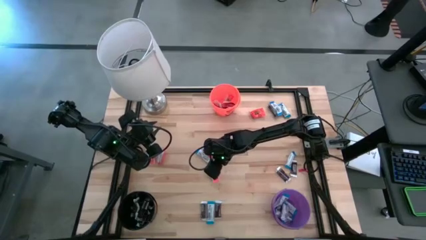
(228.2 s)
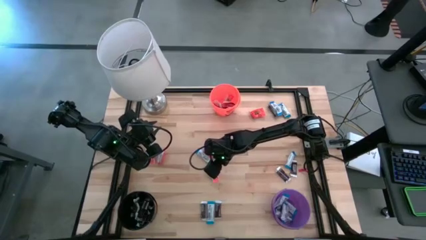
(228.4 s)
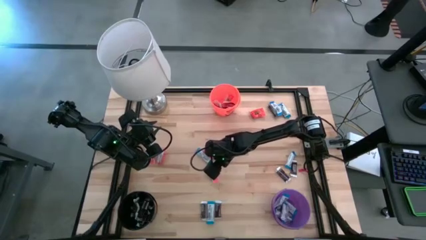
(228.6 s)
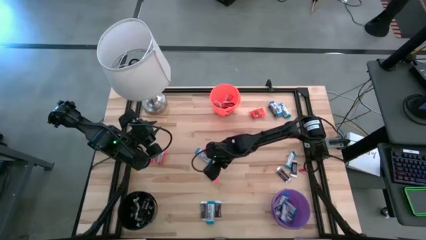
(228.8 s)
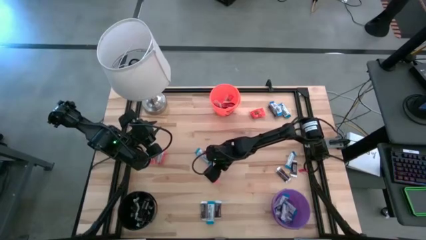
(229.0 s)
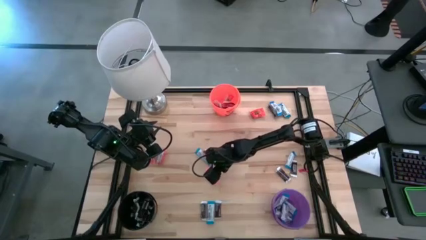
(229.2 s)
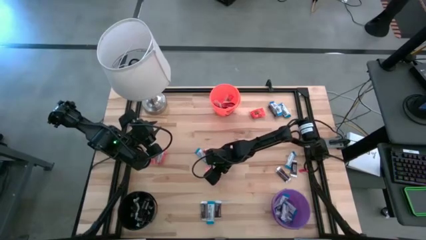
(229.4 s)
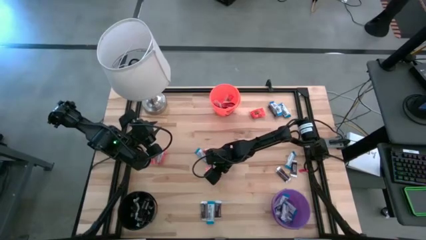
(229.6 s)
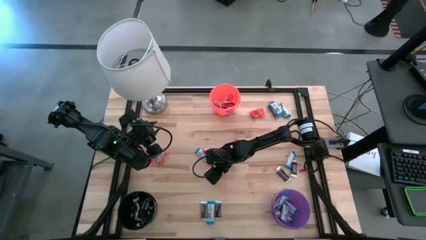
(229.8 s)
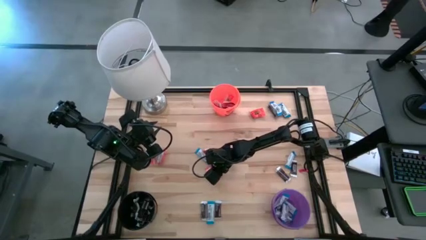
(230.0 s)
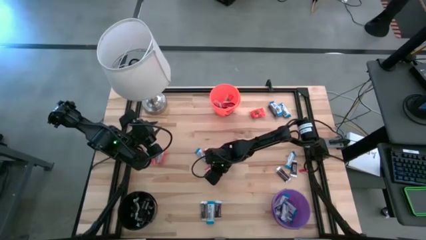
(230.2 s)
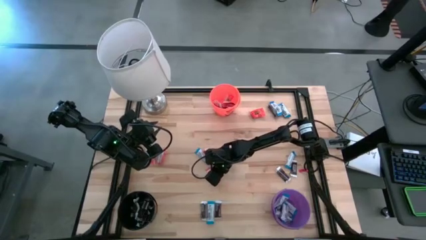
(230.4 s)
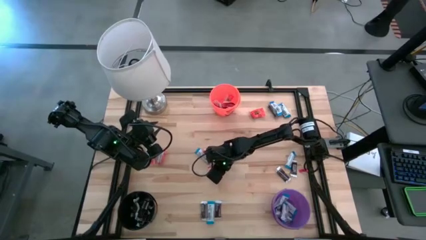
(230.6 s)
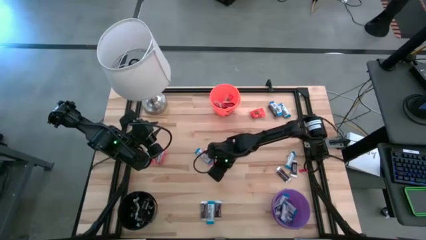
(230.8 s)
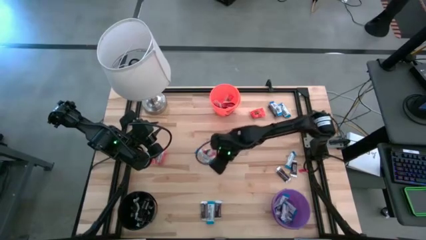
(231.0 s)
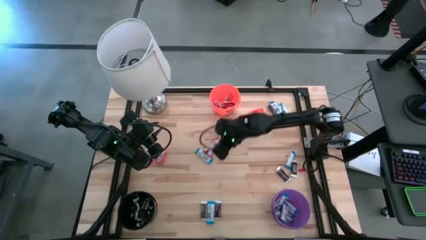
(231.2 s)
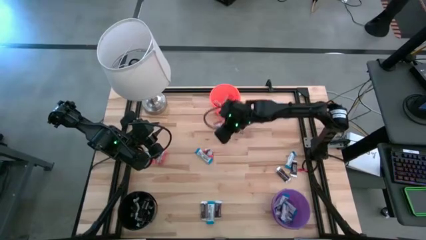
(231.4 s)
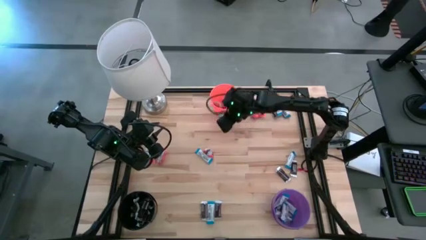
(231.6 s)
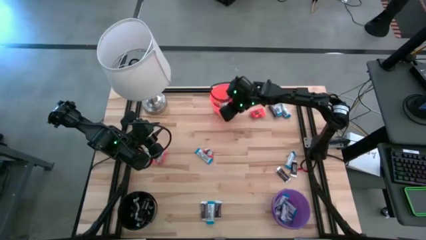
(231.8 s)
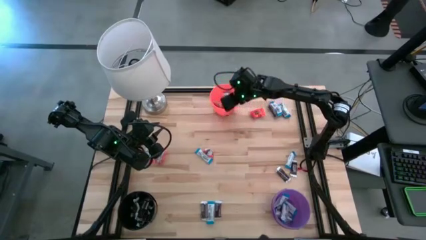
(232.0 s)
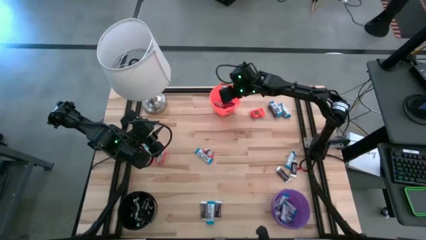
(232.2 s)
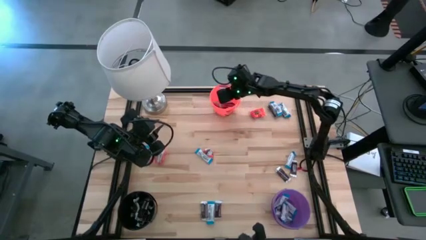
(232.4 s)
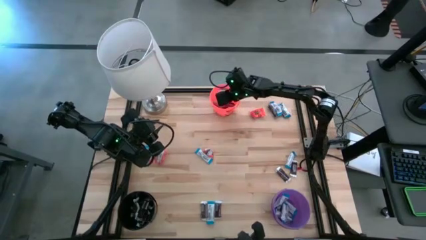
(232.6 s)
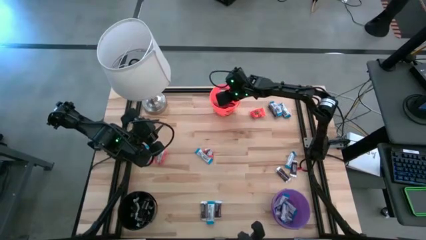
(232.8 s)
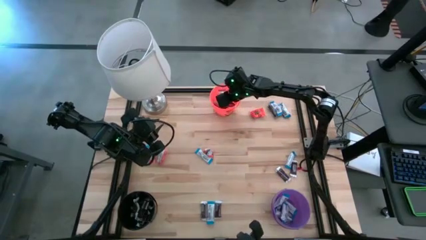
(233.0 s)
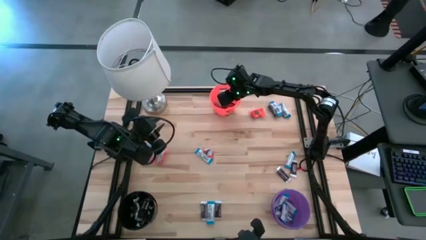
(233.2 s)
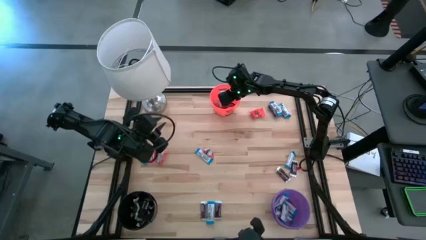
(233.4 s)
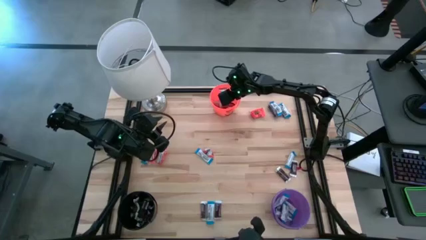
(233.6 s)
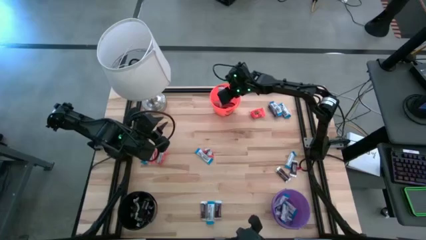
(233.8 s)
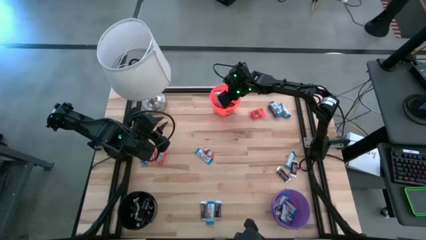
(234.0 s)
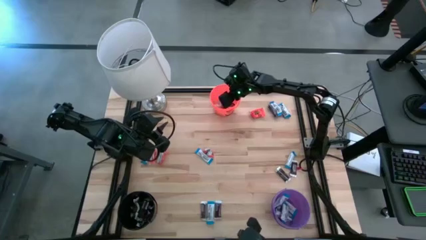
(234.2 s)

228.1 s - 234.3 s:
Task: Organize candy in baskets
Put the orange chocolate into the orange bucket

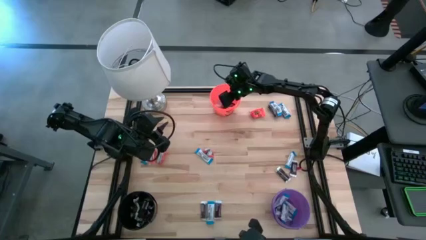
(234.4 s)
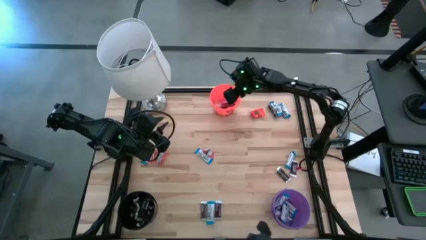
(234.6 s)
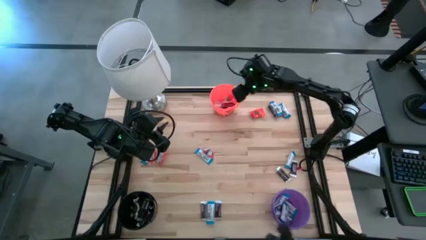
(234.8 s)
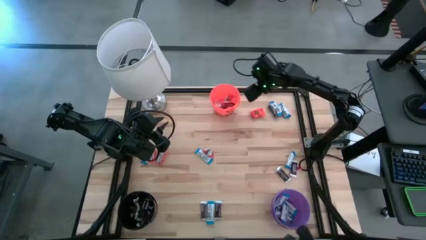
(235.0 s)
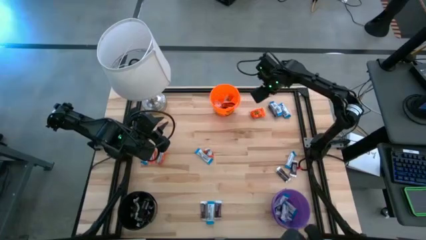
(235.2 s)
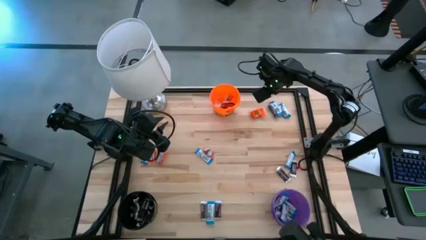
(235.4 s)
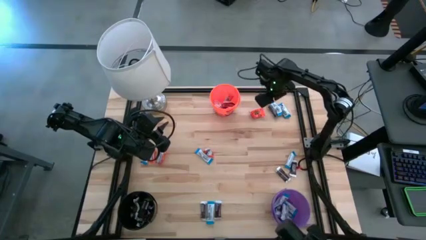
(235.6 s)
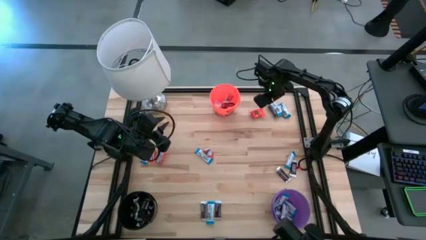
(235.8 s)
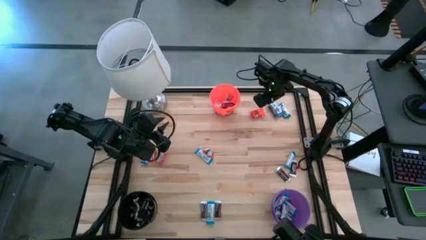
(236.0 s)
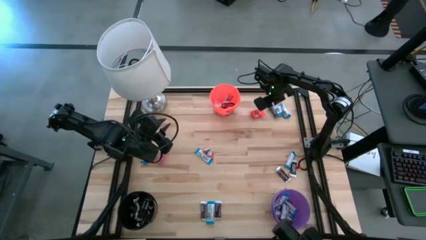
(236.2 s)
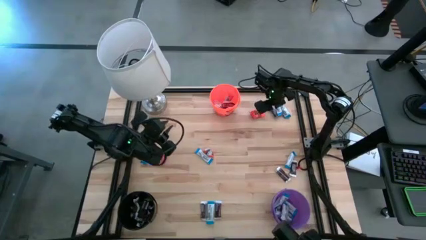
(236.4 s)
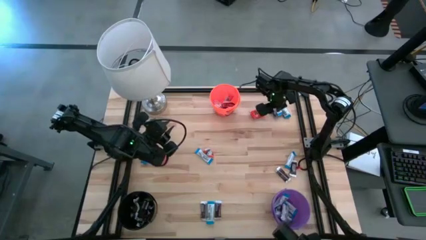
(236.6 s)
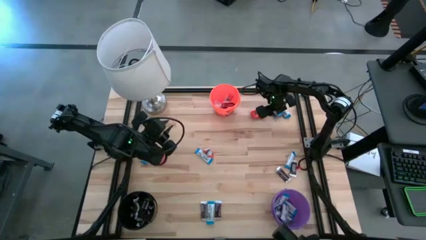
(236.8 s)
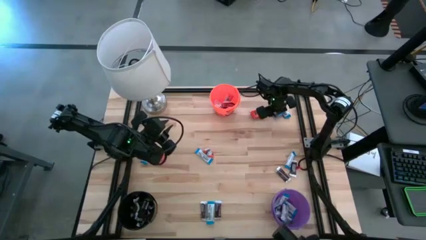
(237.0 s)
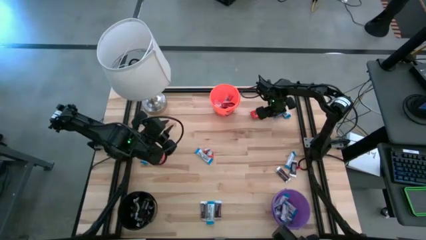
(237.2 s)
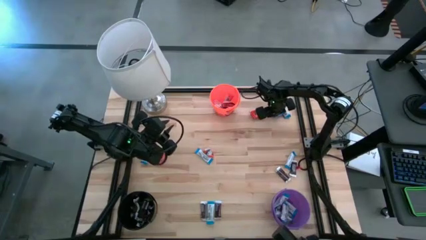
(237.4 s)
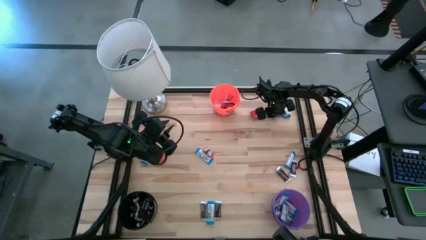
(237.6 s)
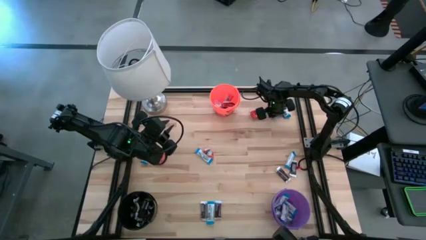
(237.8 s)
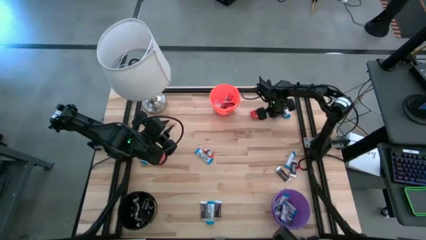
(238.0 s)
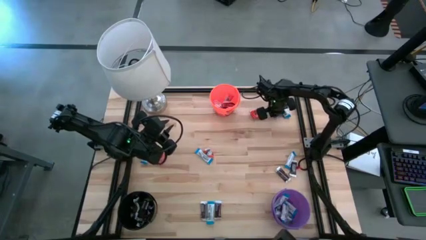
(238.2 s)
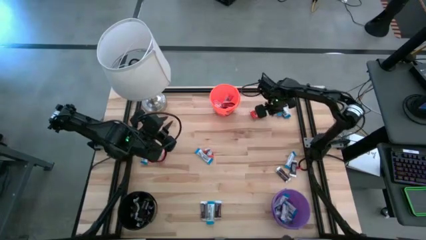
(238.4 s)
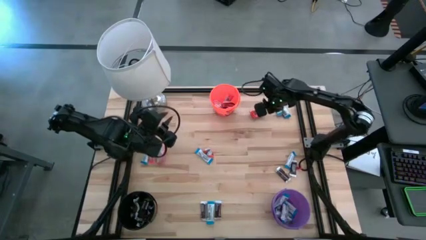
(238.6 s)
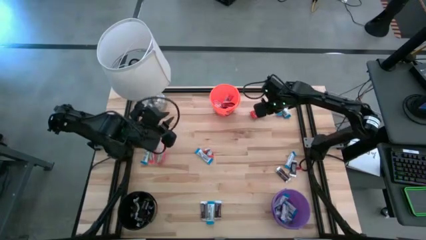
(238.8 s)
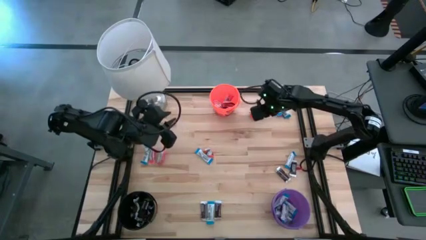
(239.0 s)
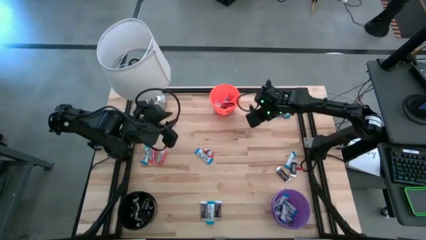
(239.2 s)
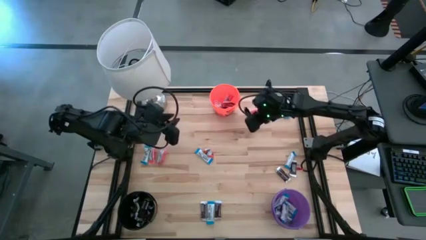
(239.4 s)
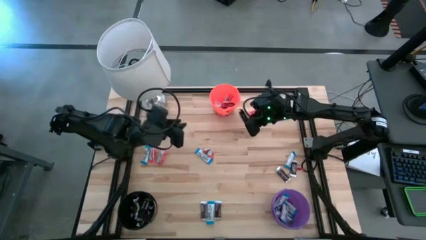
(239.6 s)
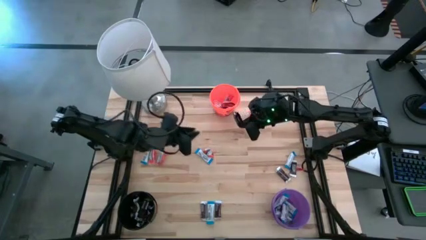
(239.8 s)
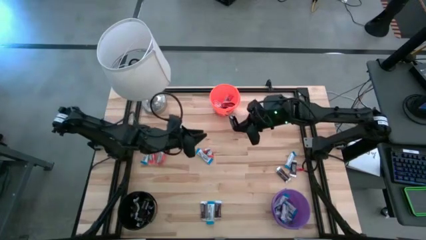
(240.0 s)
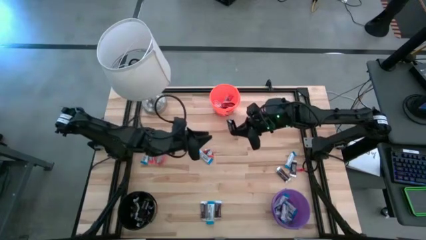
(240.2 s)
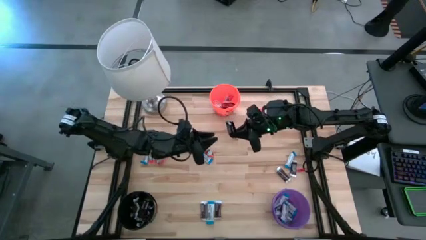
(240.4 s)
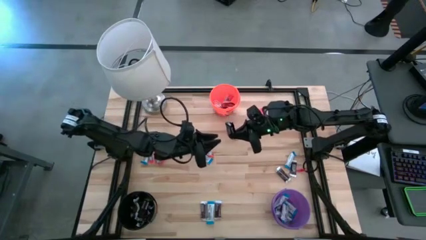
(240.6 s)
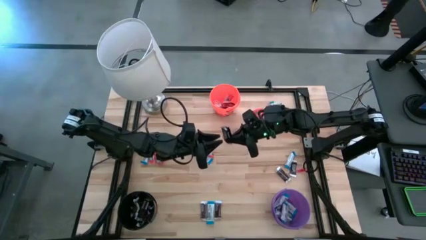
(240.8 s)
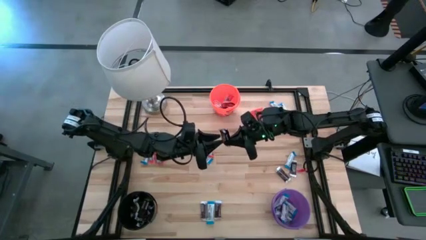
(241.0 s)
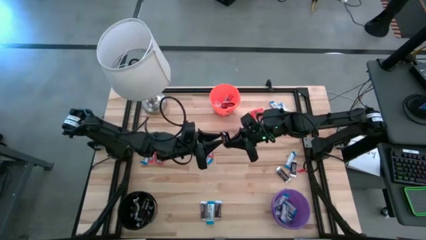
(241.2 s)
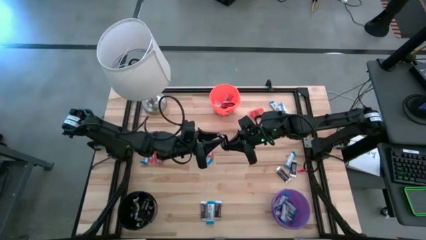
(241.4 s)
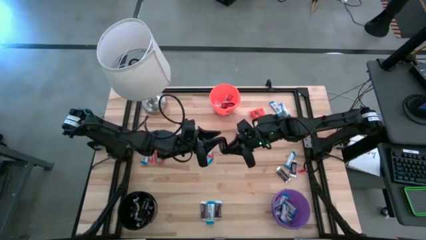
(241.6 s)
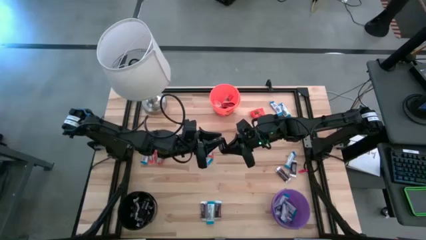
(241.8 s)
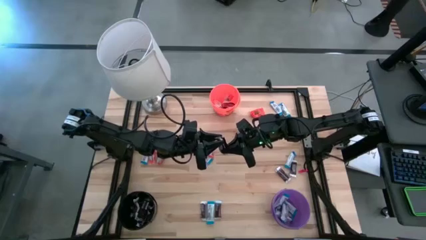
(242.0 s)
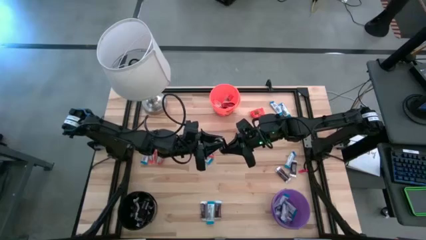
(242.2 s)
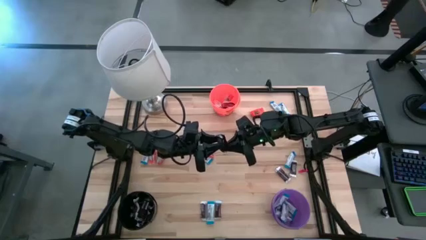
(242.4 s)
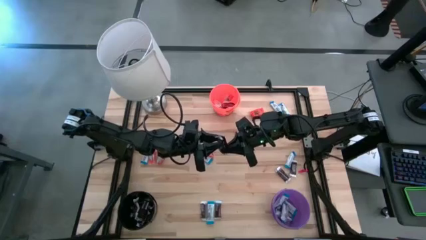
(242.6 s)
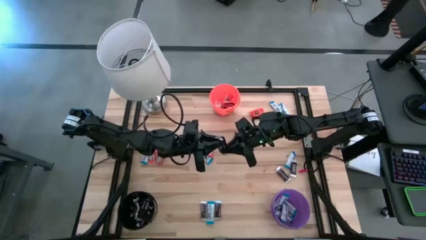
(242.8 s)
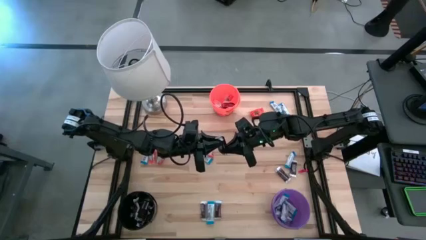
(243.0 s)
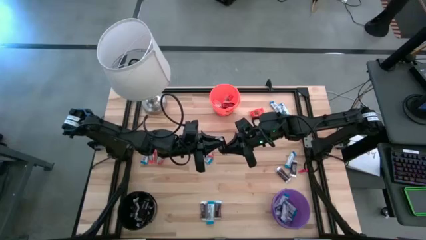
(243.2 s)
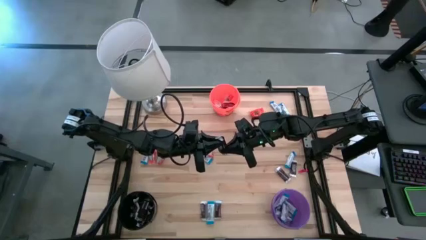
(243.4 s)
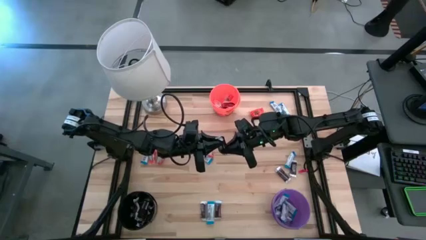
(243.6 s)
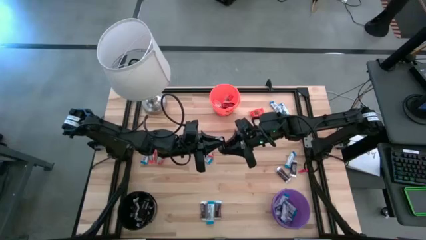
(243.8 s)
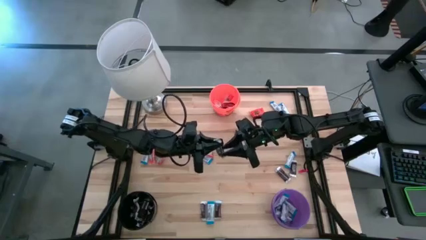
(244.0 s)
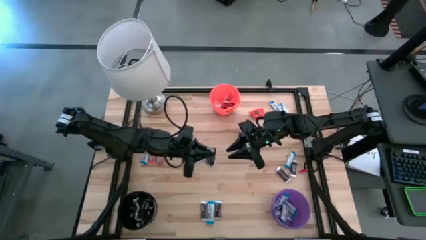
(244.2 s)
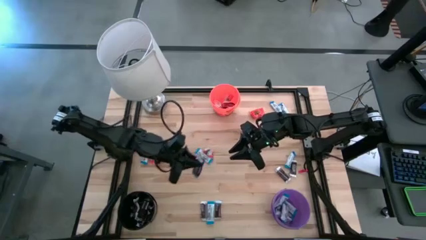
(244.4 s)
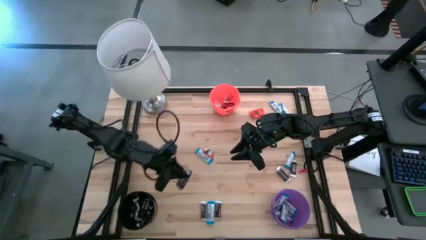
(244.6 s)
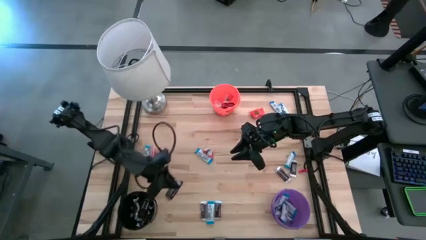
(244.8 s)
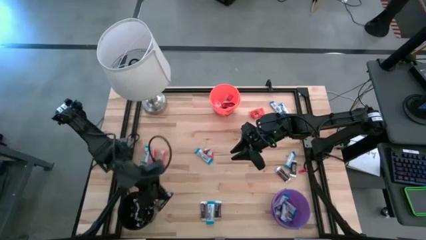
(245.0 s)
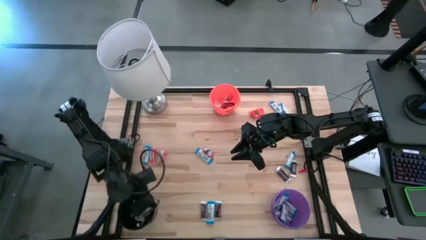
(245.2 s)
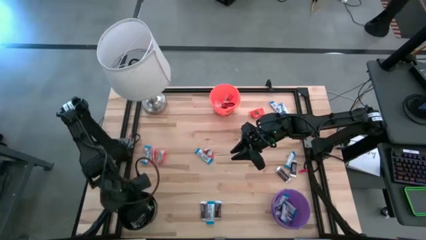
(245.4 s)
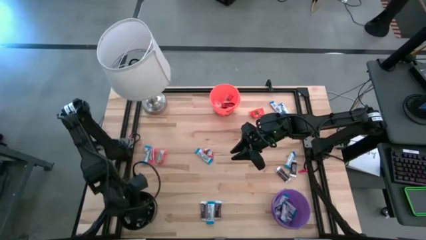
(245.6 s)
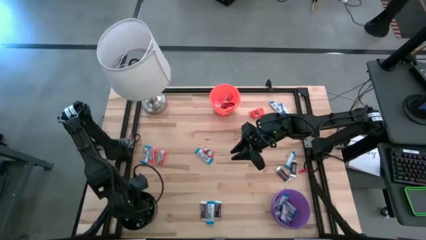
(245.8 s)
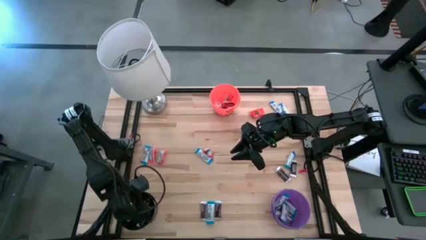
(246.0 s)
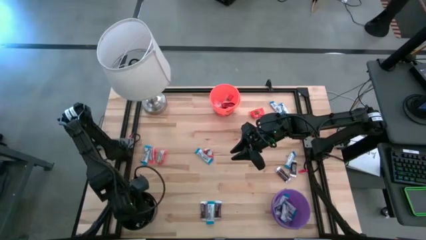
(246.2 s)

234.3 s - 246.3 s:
Put the brown chocolate into the black bucket
